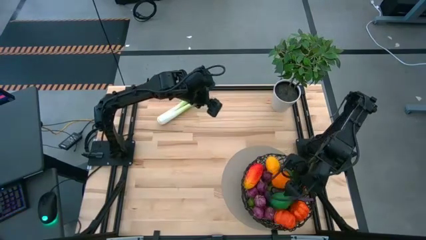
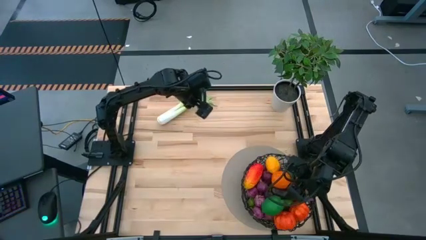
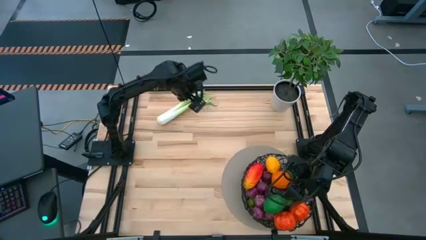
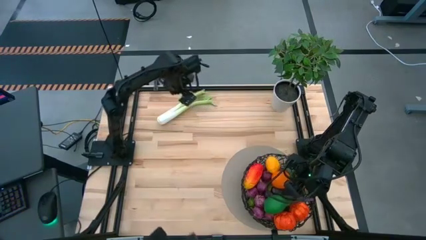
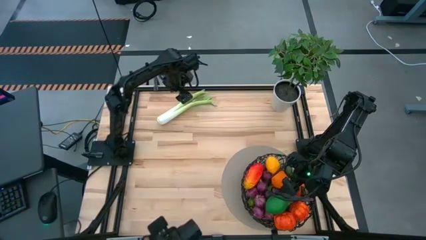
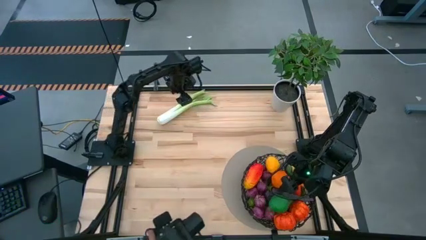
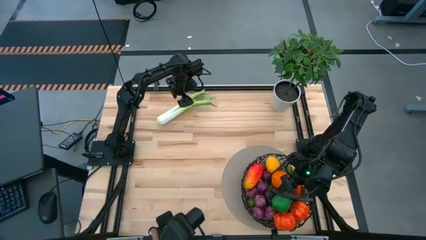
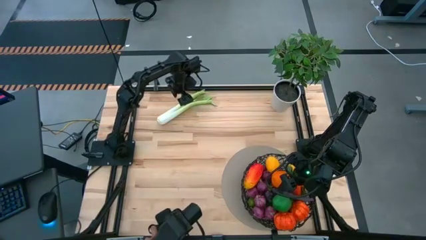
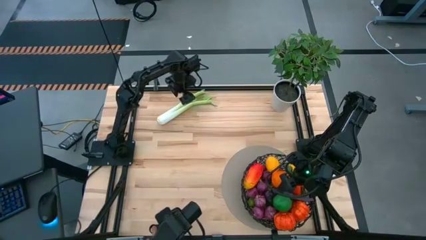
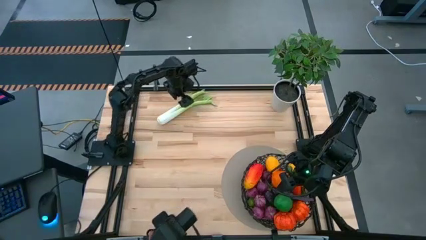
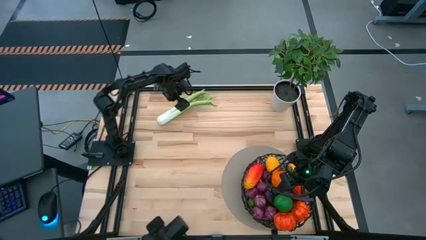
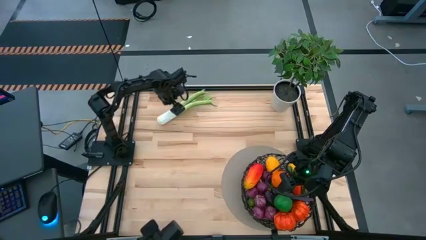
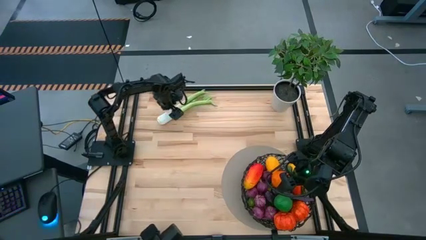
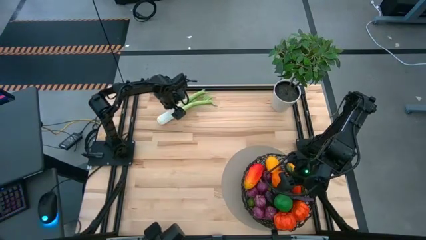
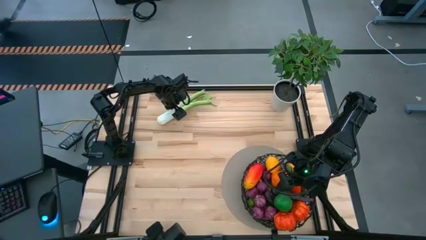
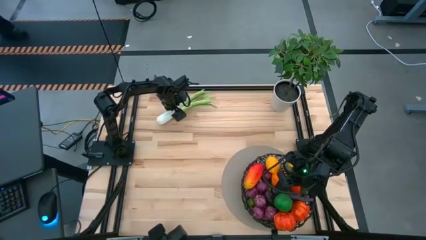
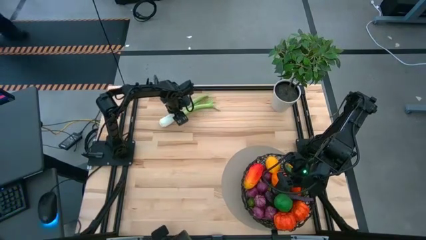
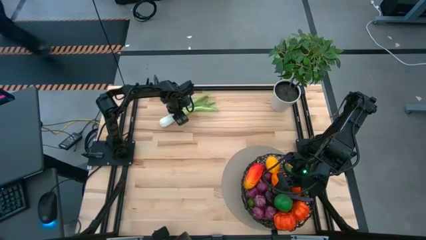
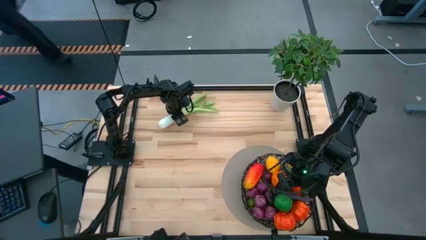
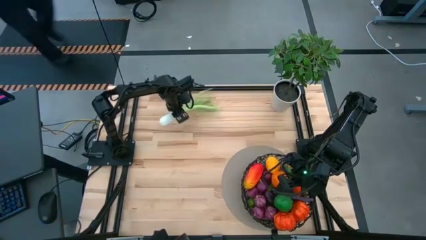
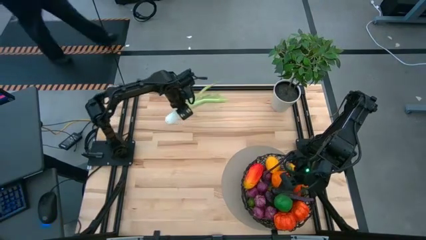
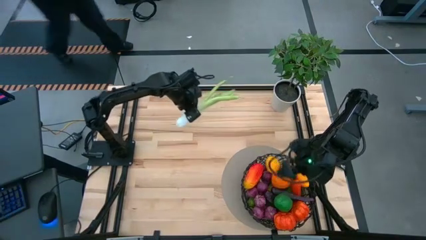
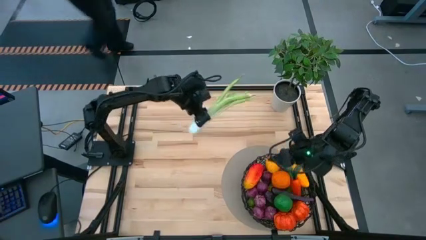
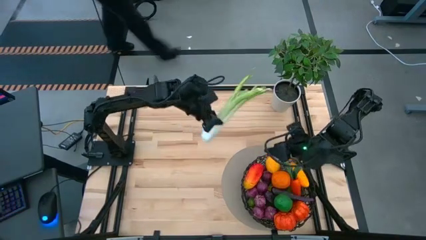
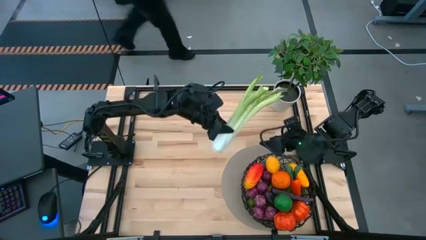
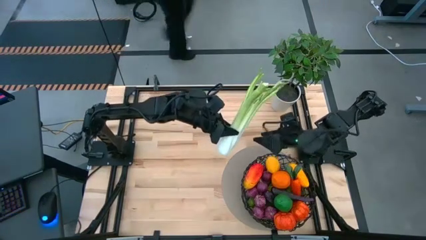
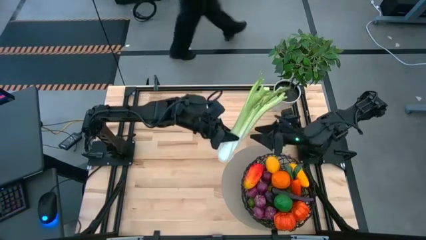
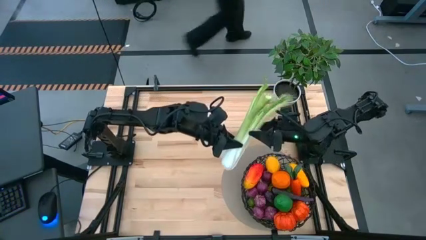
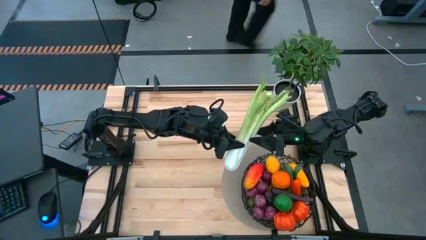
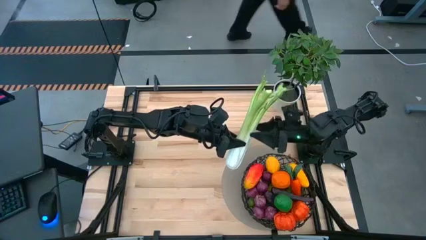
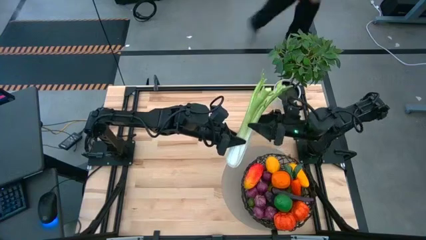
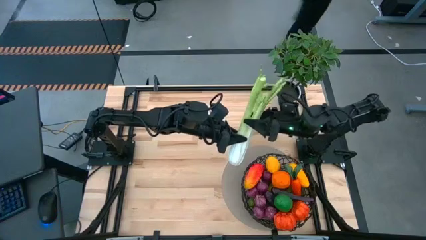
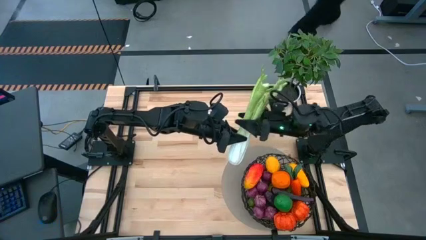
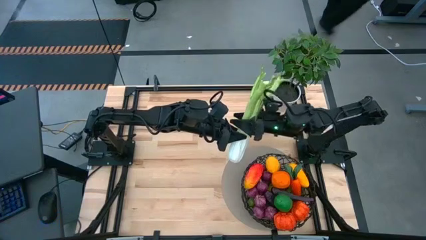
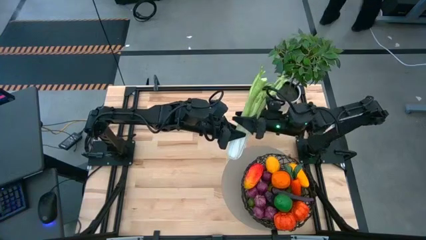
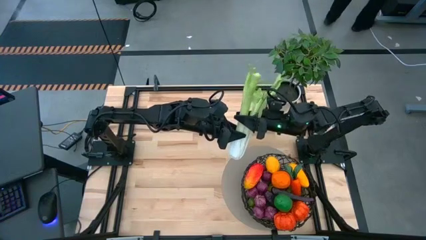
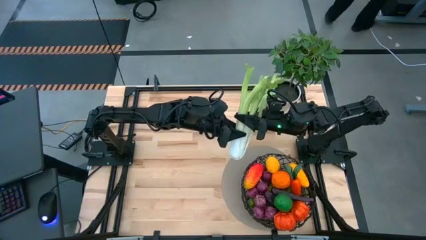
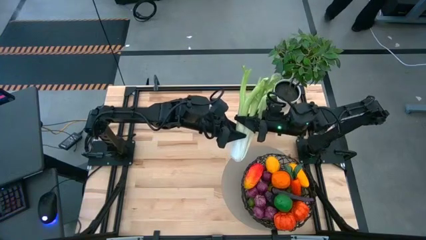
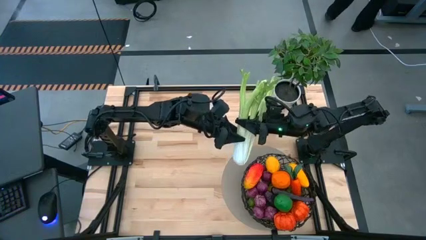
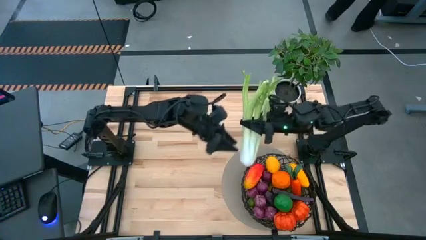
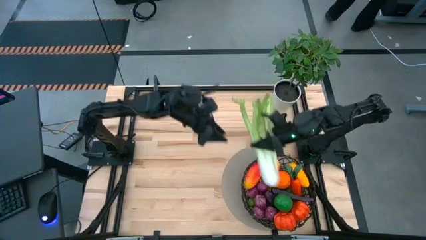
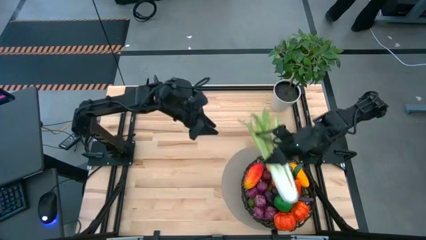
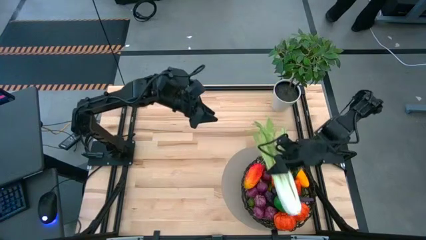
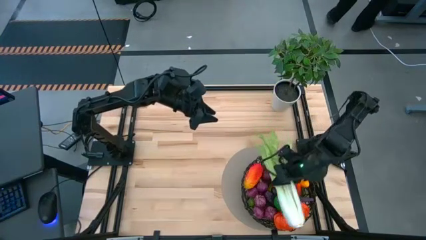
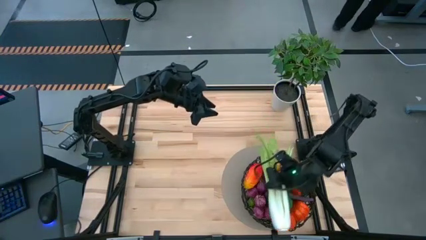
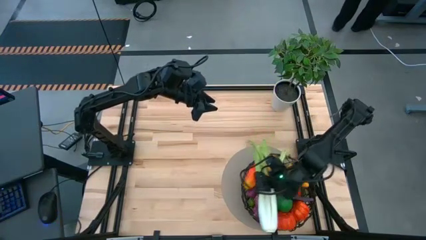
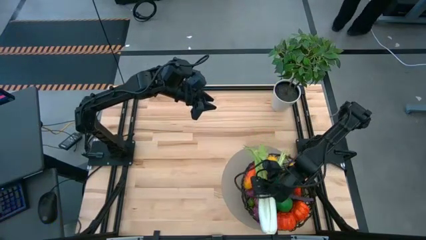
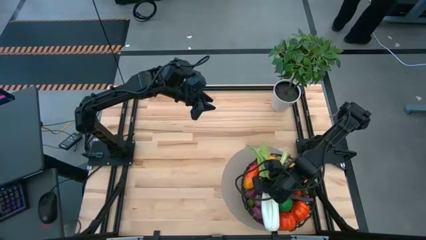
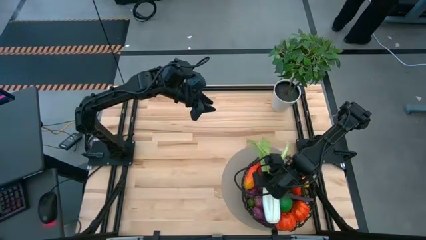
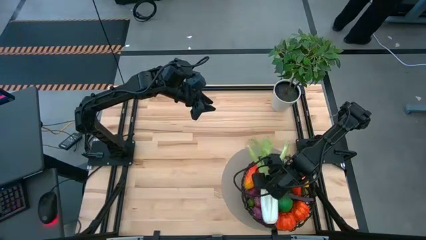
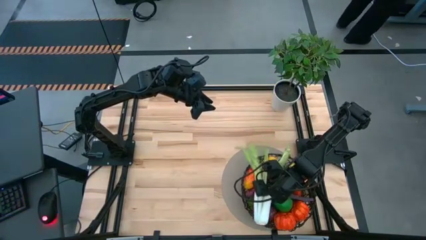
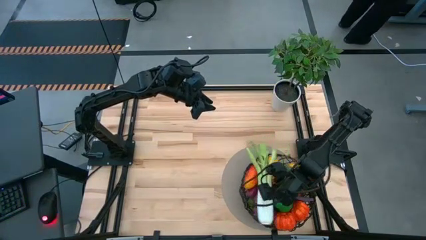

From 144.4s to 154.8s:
Task: Build produce basket
Put the green celery into the black basket
